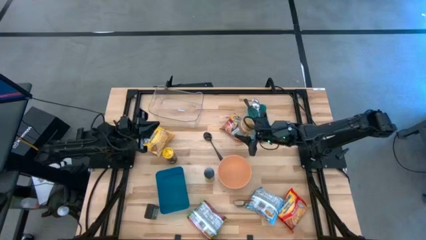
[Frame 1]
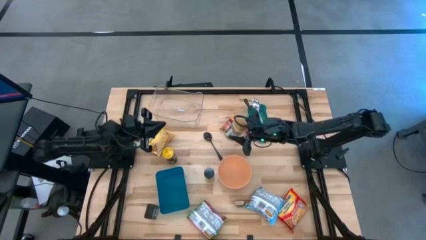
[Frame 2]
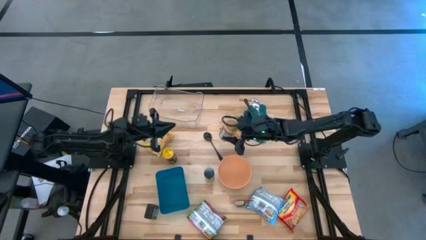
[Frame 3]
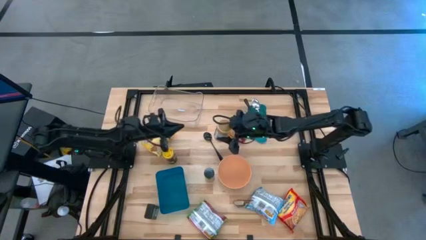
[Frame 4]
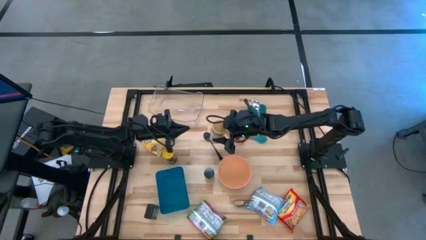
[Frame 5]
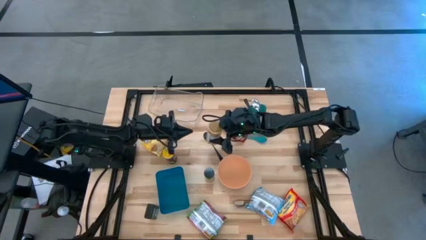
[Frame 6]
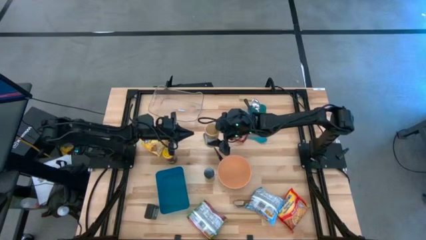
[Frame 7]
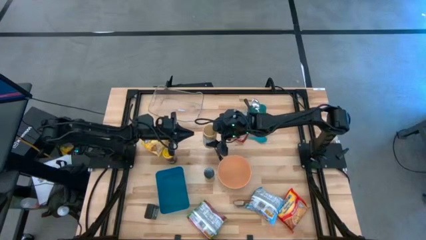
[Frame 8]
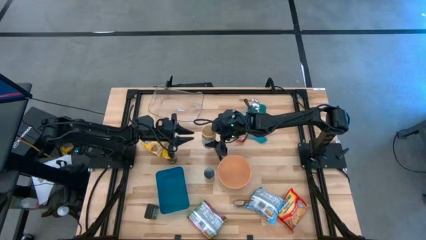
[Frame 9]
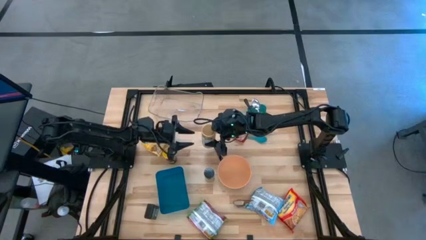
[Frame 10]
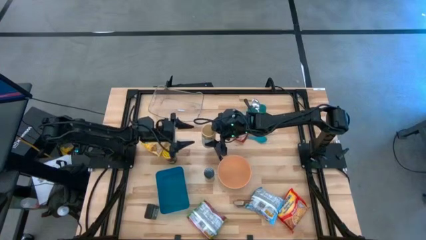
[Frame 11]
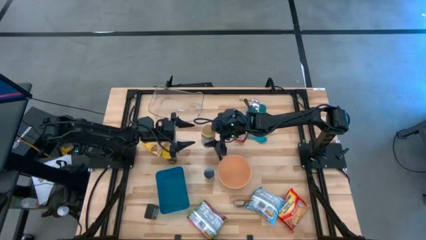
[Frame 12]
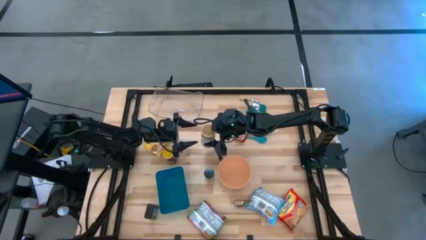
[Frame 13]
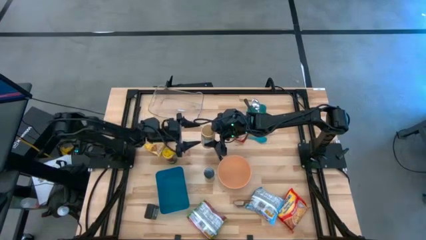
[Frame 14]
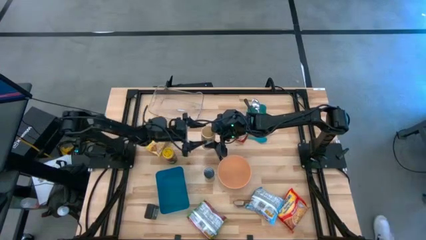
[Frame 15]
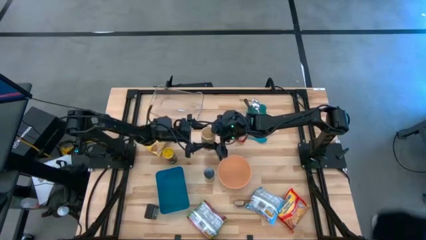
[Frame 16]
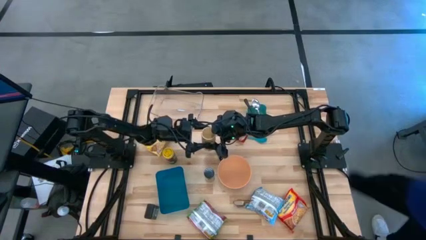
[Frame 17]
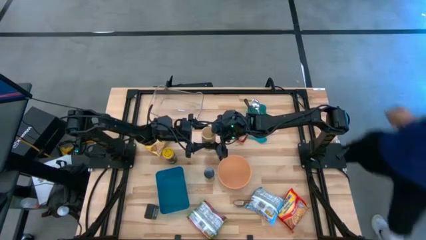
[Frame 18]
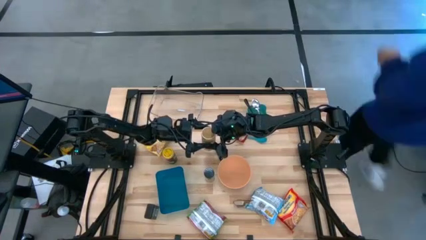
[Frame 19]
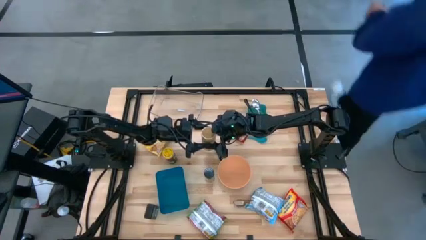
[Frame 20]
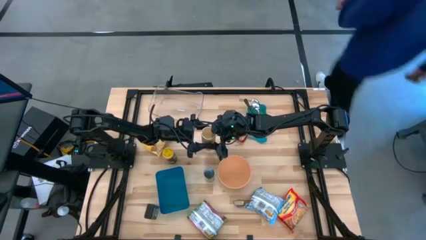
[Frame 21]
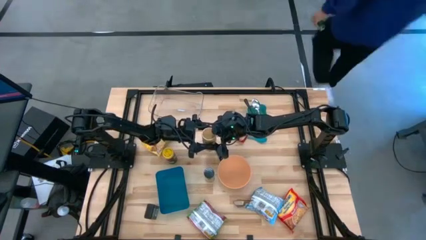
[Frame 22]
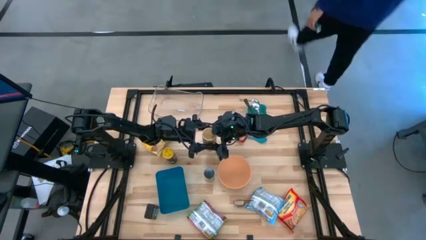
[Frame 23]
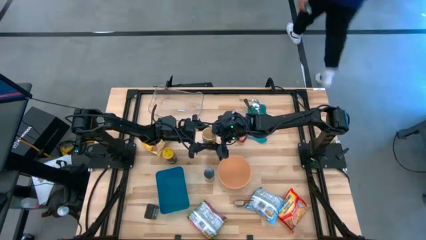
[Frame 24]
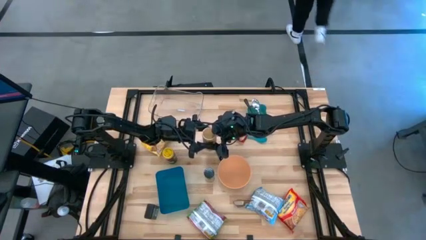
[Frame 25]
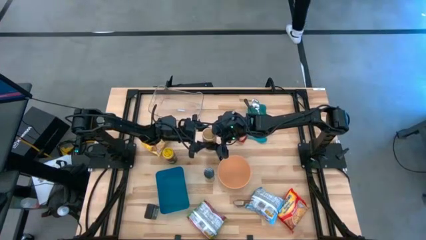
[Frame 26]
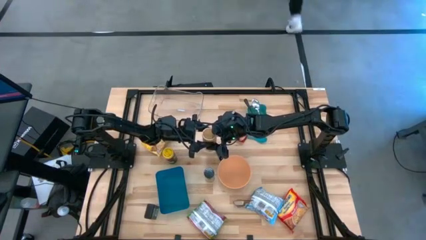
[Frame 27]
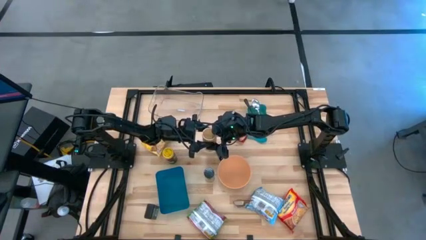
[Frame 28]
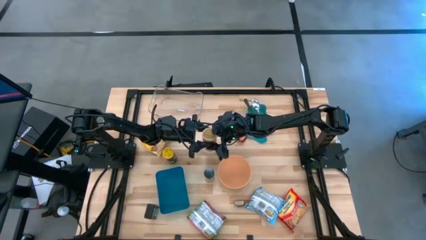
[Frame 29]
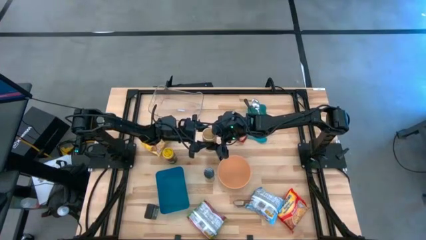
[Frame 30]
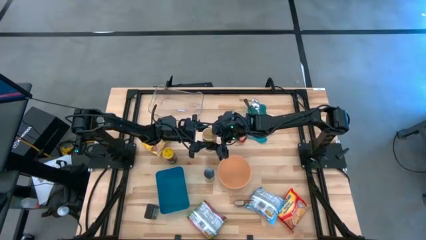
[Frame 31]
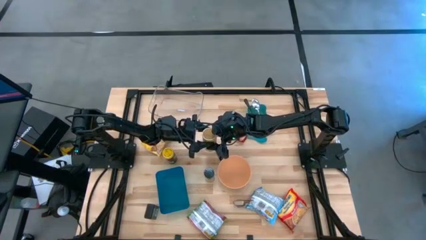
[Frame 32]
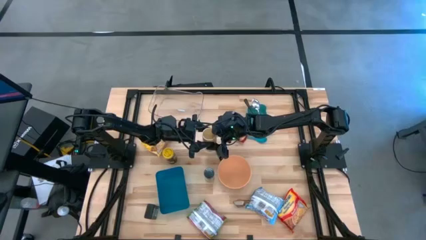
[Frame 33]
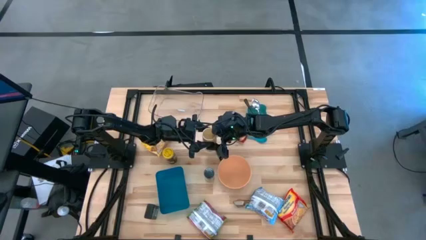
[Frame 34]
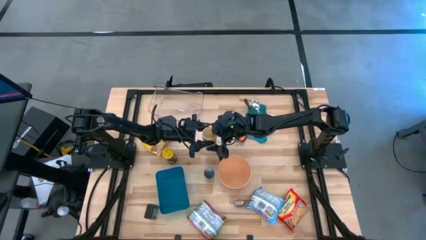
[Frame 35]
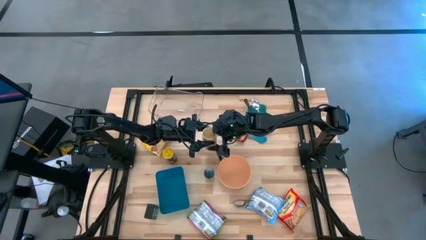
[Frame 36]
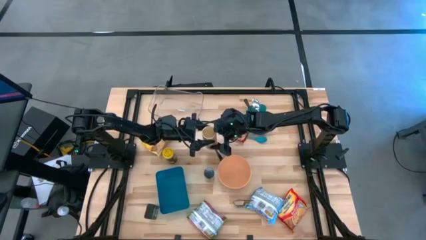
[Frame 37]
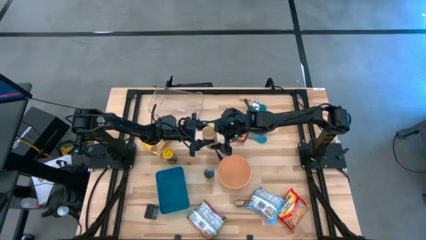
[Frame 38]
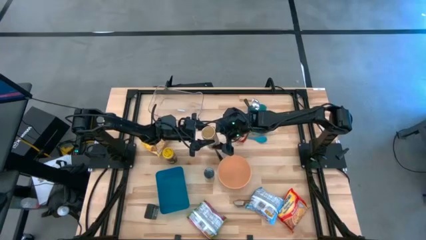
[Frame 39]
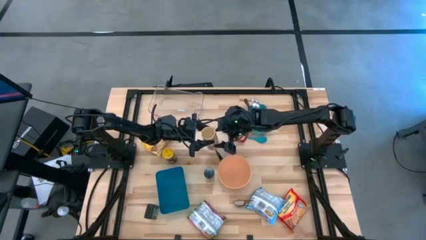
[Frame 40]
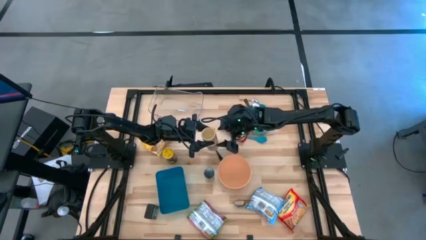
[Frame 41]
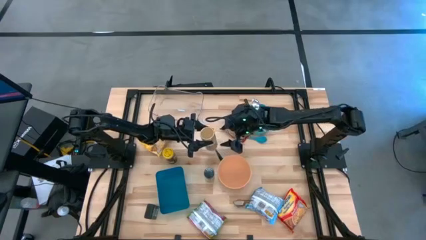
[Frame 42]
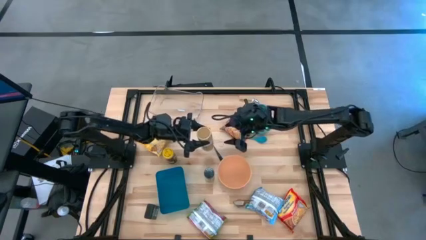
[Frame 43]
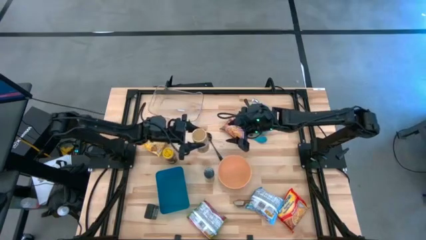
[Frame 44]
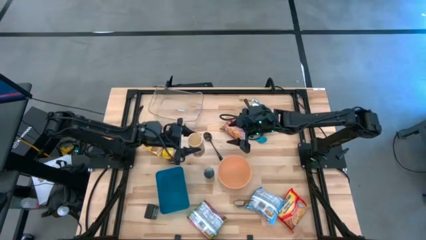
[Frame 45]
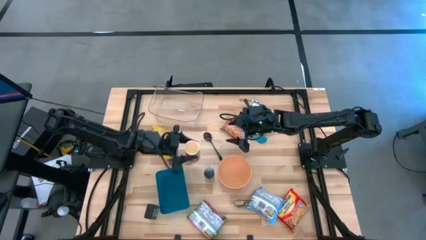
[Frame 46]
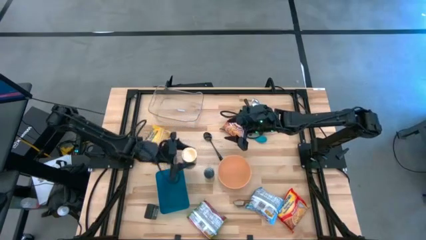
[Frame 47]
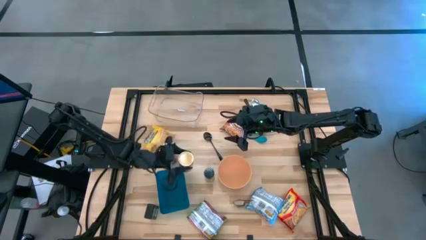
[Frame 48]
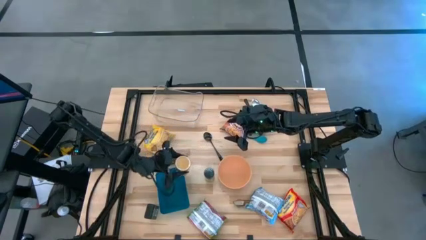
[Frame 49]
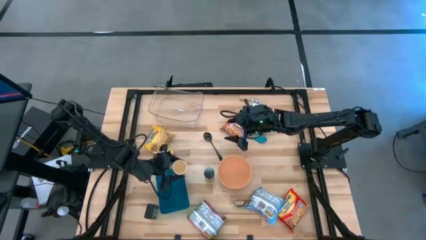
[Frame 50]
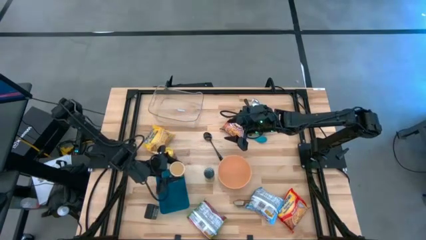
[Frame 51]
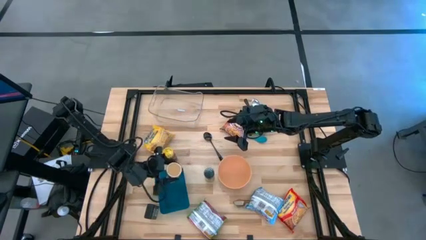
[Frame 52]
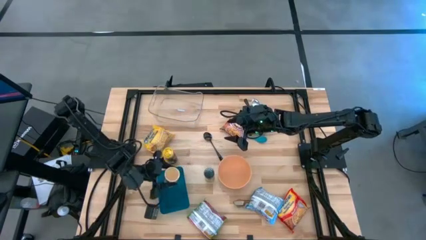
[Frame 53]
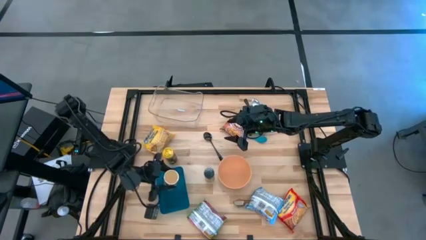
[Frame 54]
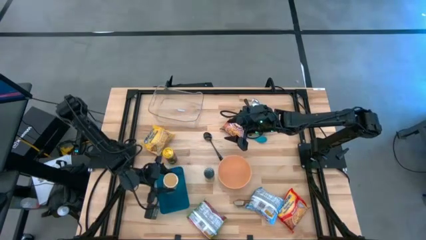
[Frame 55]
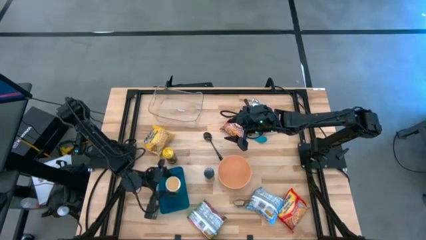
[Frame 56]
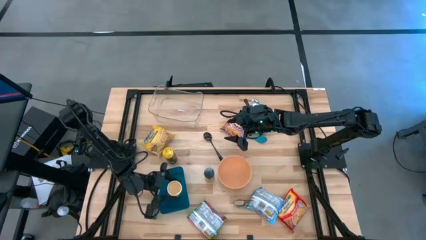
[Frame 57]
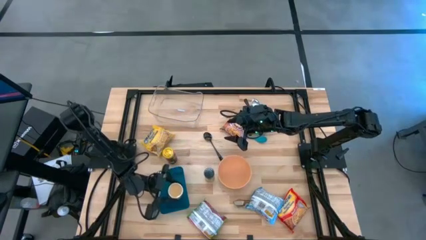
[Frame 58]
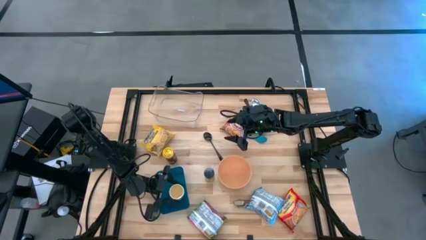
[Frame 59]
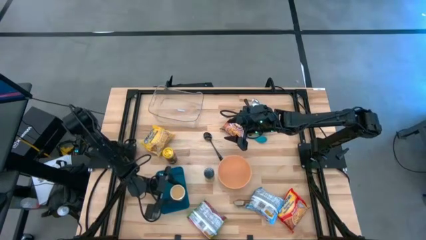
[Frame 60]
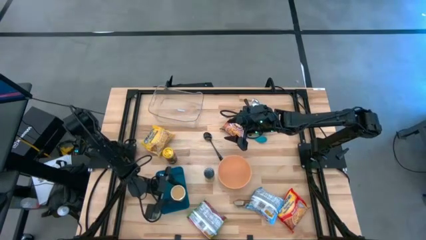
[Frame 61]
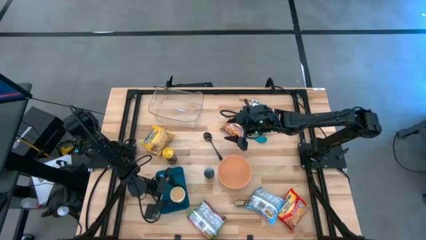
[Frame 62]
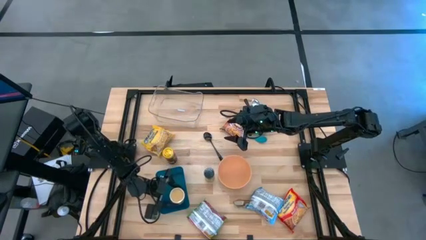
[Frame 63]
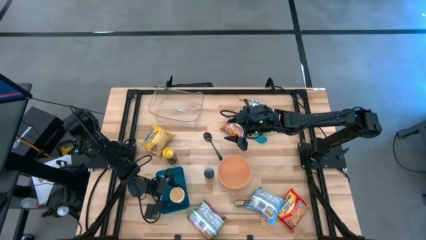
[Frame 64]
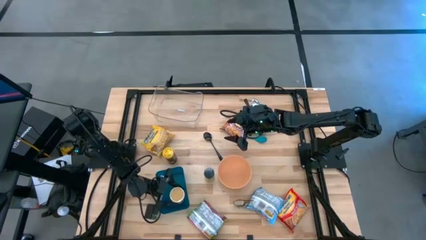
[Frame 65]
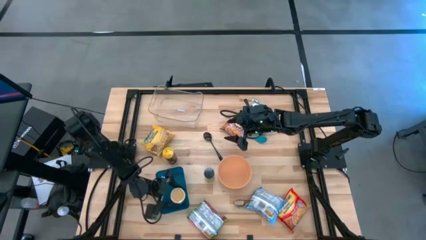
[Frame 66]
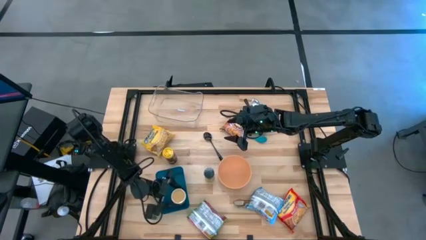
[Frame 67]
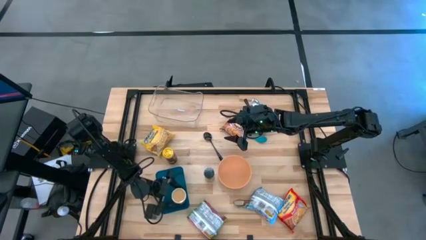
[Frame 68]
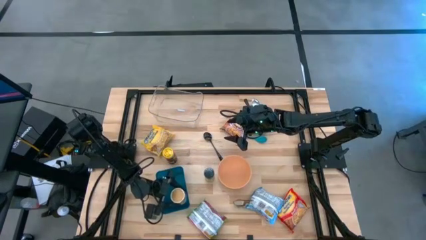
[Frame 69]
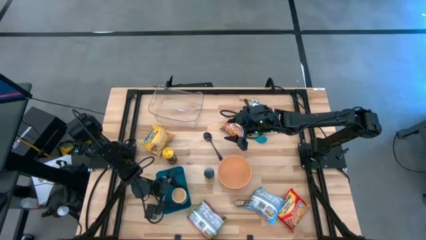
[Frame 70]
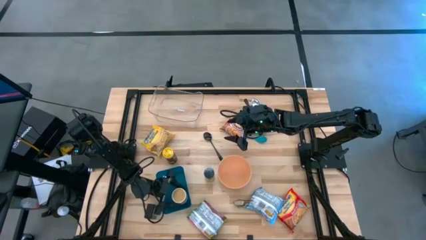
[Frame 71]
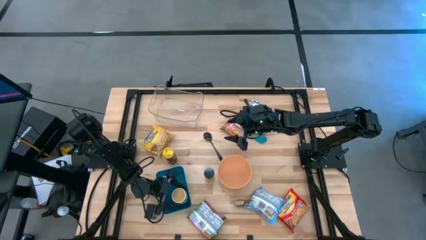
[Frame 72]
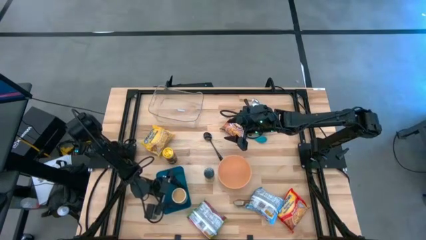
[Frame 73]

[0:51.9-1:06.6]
Task: Pick & Place Food Item
Put the gold seasoning bottle into the blue bin
